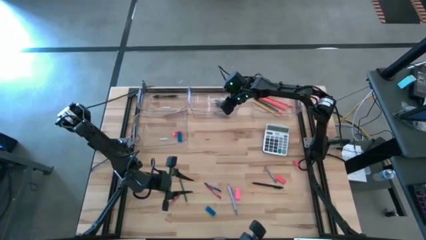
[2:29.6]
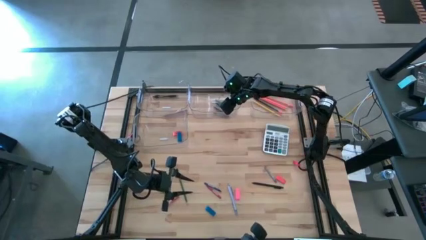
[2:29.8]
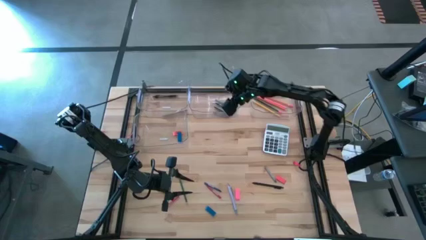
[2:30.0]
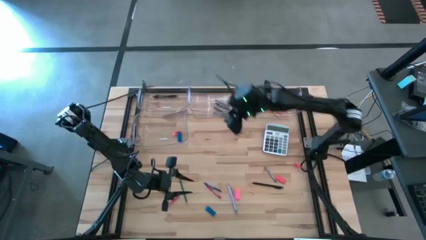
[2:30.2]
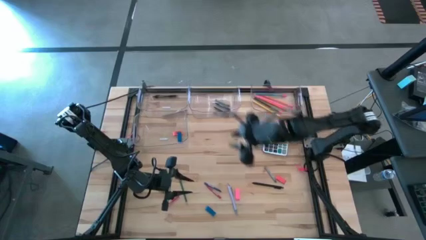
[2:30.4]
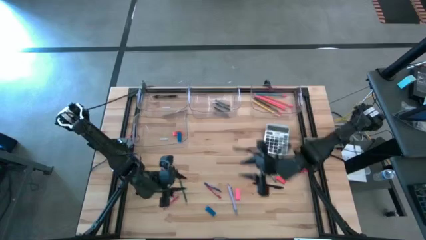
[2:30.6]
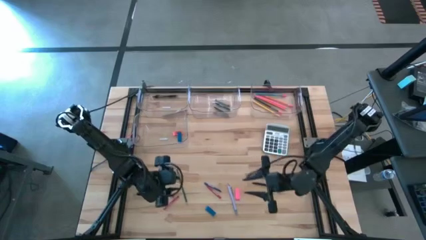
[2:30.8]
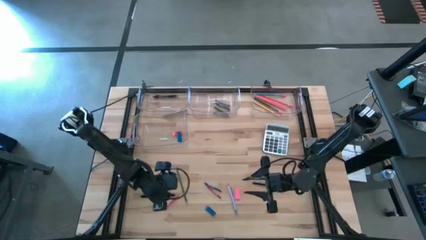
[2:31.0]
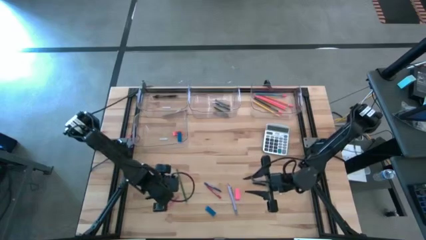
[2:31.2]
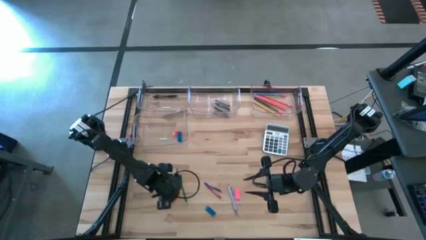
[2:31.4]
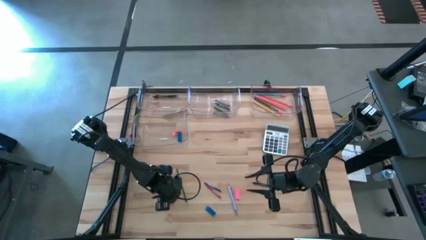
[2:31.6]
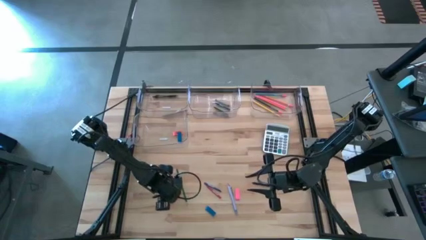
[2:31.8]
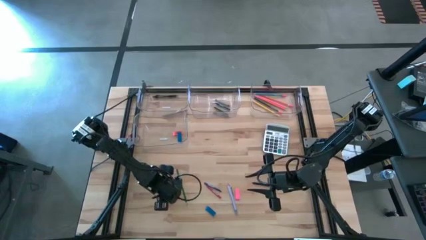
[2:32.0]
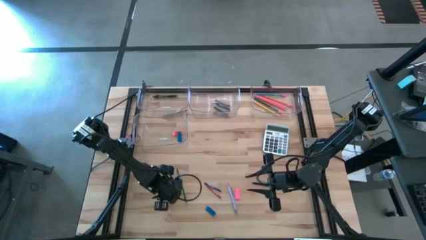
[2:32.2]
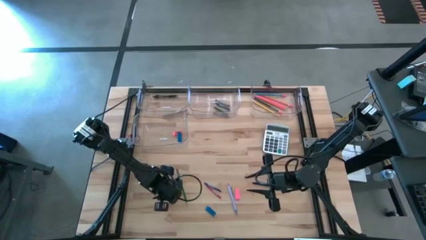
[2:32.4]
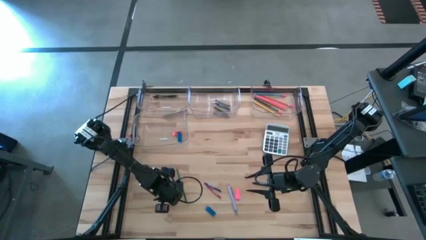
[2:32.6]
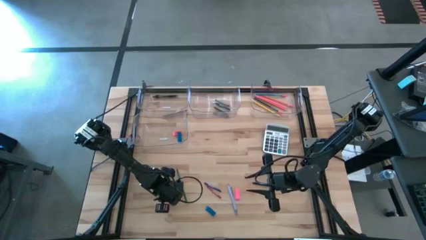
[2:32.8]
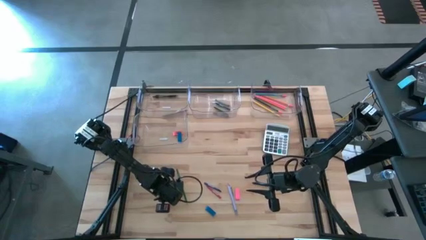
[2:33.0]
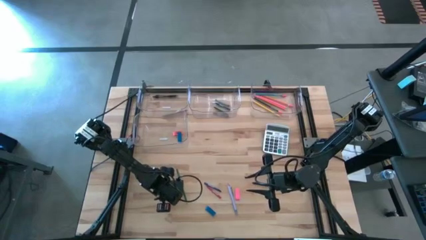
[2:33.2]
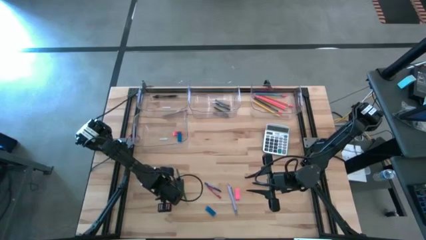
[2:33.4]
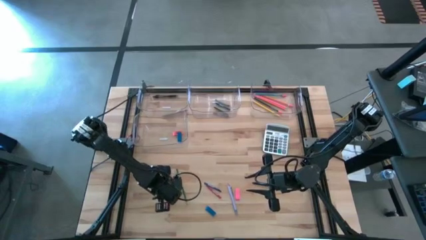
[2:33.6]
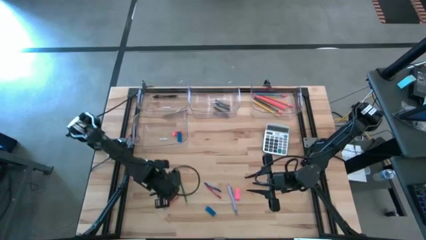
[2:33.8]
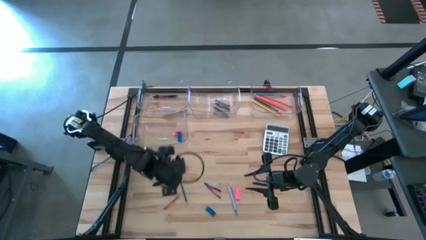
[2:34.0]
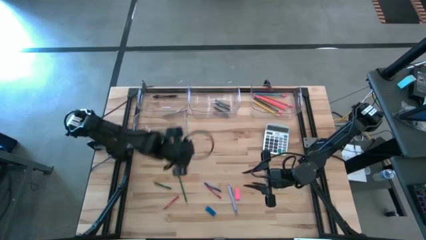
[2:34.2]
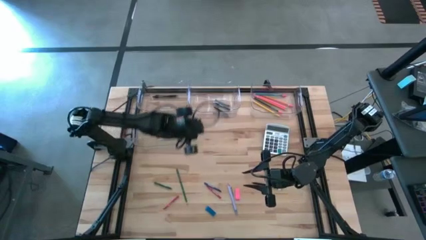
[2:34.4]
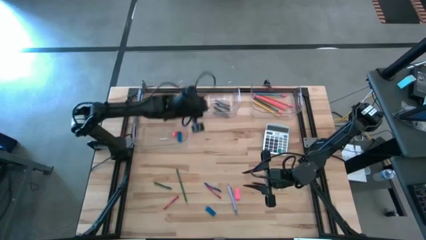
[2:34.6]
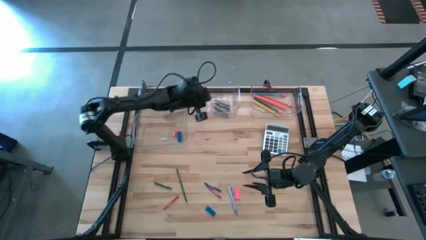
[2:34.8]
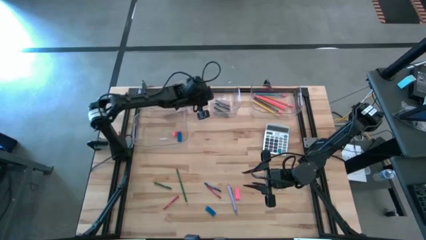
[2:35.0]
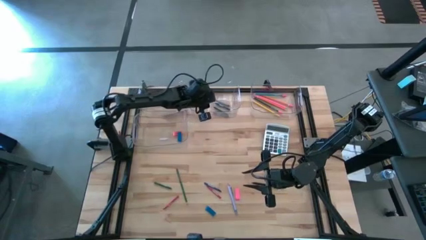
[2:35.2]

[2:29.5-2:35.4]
Task: Sort crayons/erasers/pens/pencils in bins
Put the blue crayon into the top center transparent bin

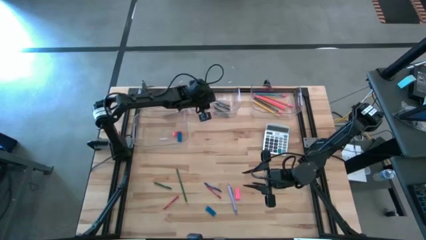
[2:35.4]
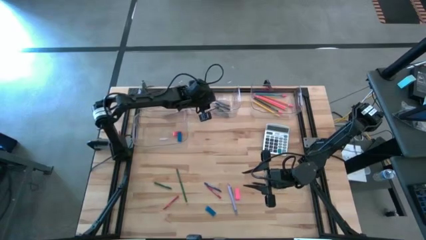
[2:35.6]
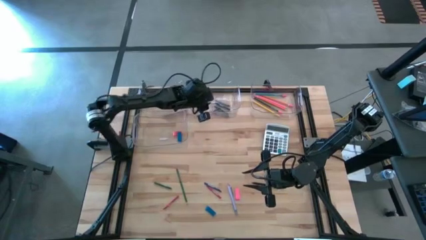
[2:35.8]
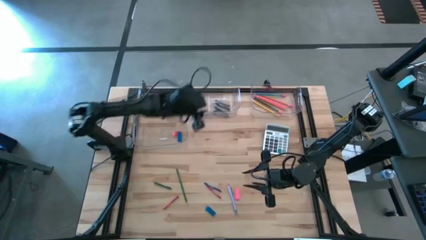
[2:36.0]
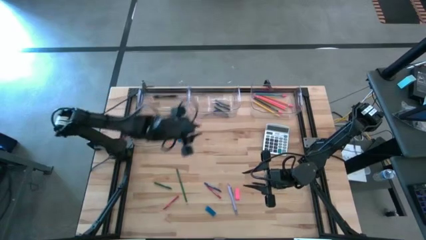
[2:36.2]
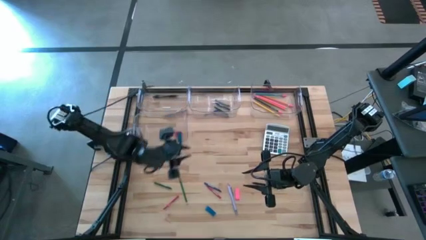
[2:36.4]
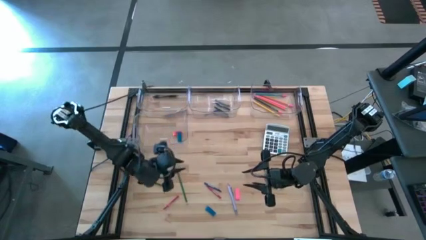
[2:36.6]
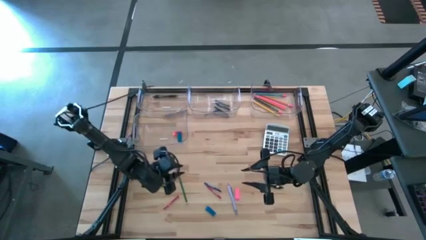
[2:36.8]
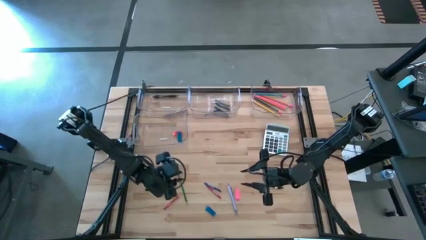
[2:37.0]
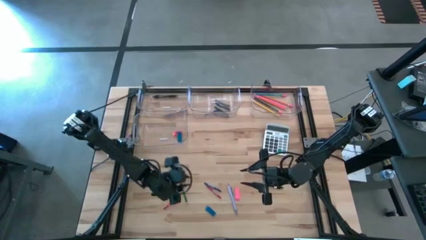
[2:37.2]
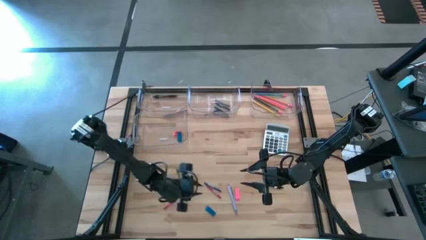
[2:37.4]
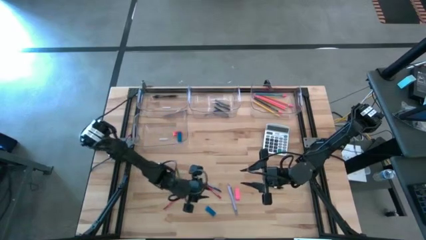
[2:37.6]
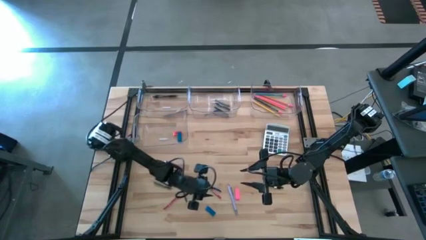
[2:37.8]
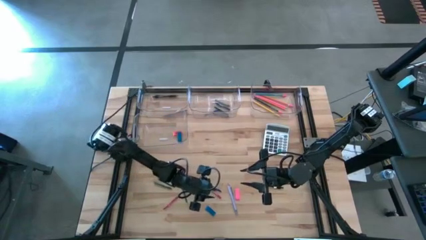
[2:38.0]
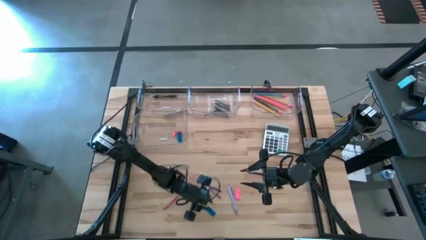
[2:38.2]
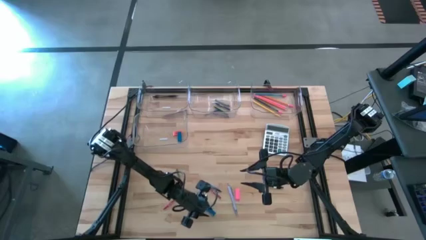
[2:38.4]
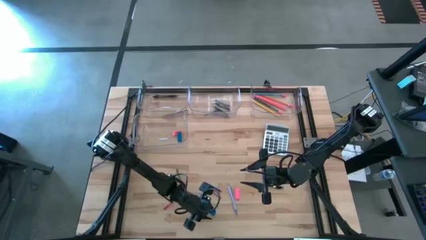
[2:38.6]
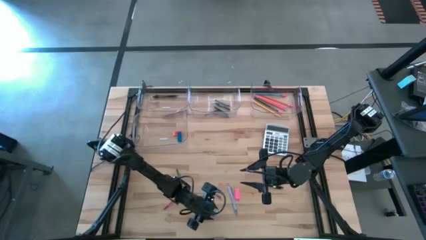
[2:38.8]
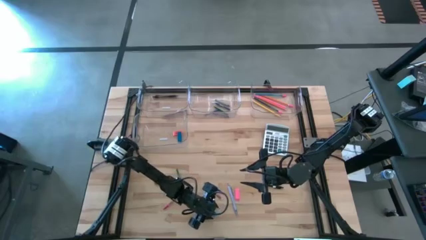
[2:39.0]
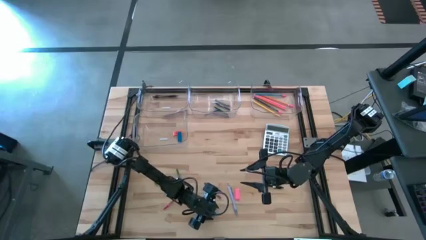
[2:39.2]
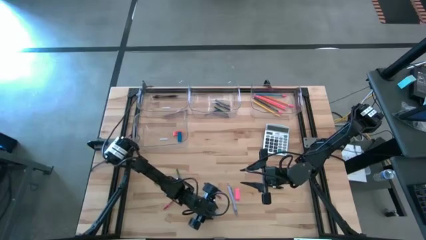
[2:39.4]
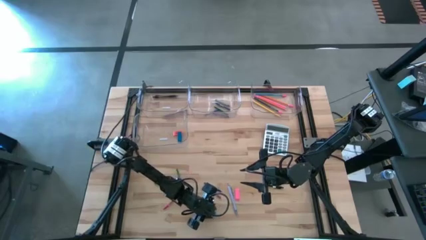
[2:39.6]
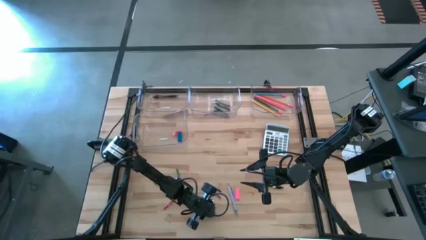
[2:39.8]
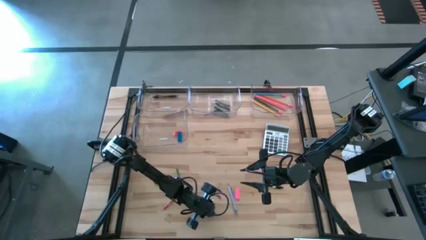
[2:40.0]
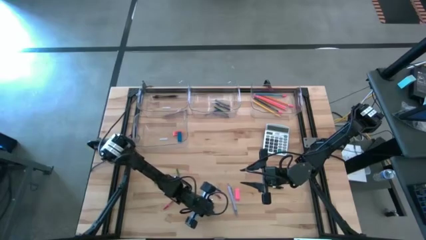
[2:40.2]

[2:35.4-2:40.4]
Put the blue eraser into the bottom transparent bin

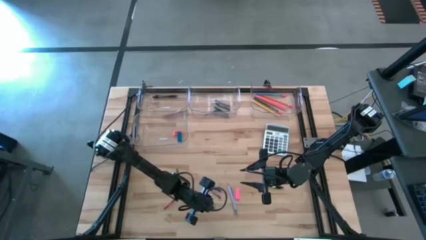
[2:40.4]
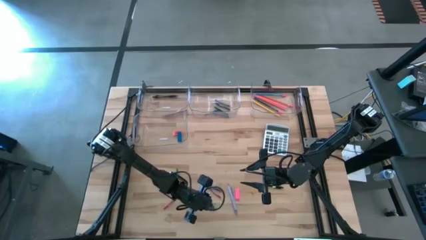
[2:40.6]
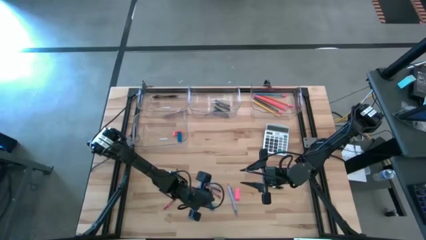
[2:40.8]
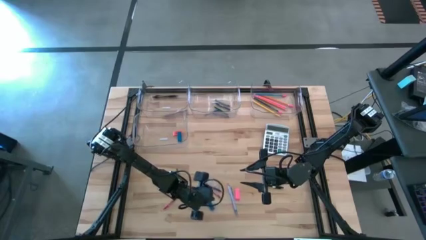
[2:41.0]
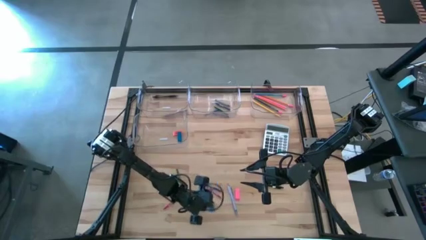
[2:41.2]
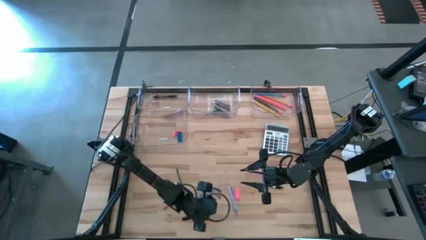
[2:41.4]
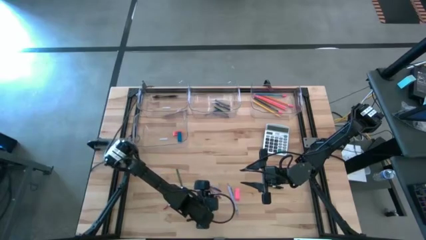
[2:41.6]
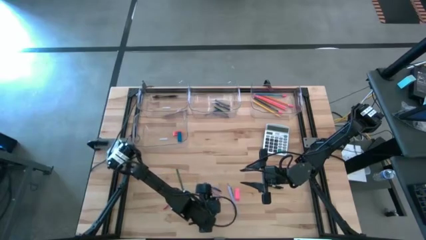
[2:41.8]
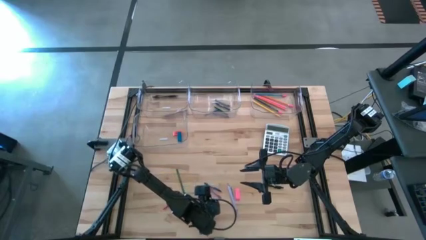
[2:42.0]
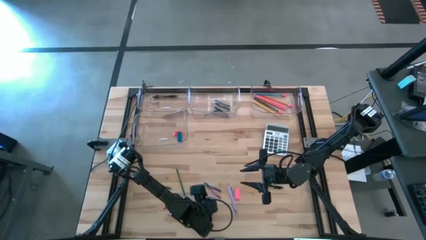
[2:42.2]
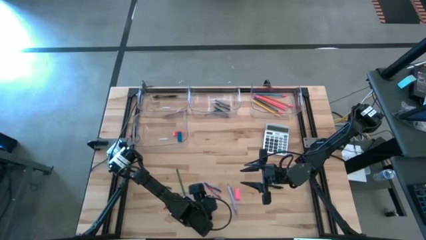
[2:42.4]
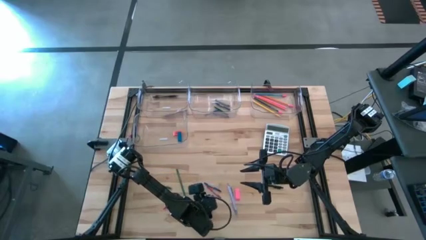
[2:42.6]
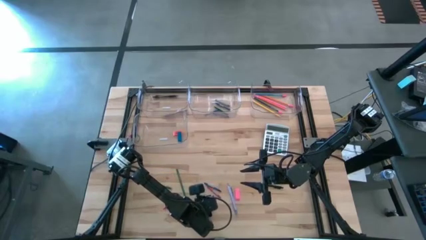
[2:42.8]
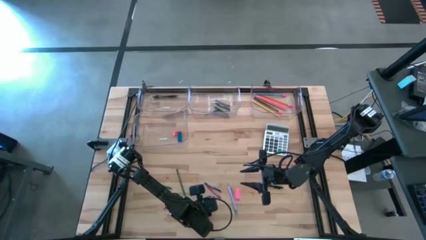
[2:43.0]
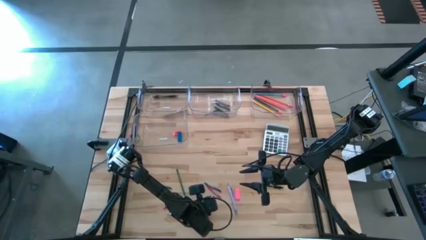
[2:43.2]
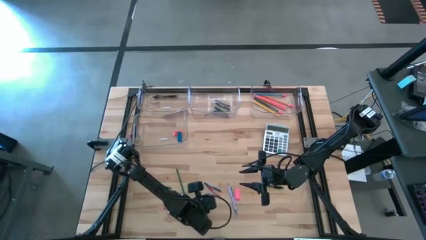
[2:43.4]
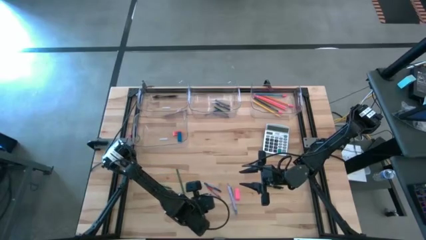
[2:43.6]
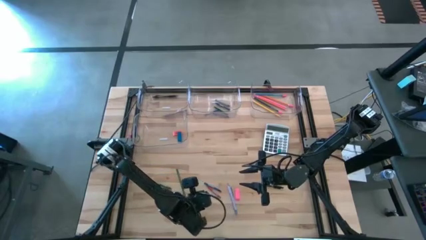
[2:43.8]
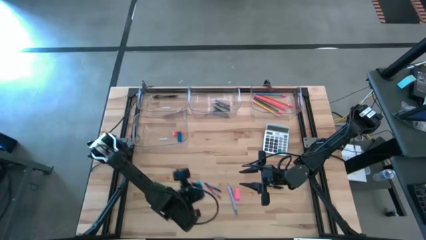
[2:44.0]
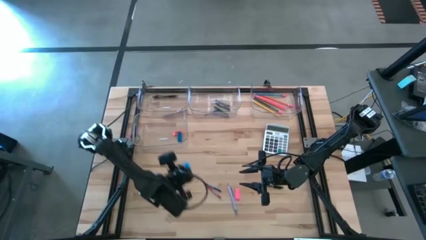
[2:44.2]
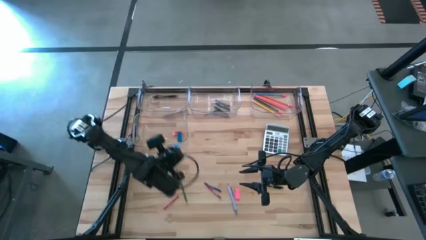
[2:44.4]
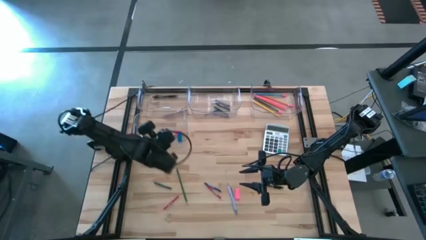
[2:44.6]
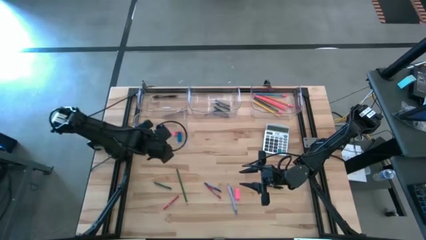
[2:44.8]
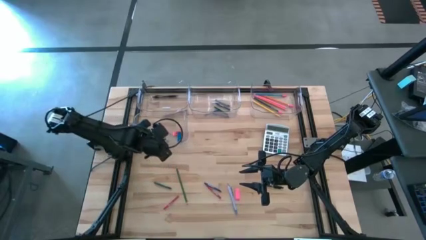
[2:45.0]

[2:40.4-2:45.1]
Put the blue eraser into the bottom transparent bin
